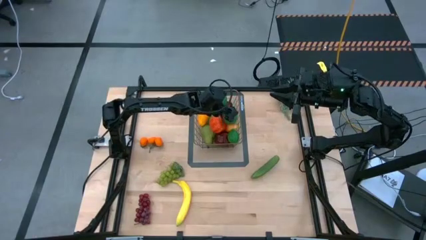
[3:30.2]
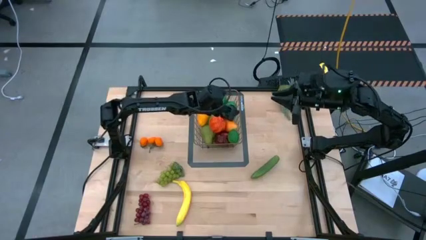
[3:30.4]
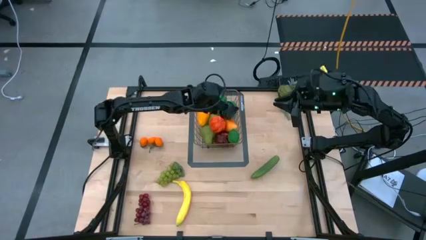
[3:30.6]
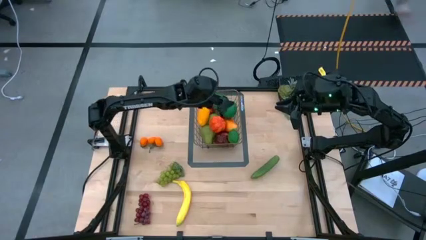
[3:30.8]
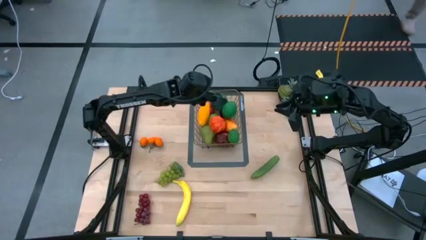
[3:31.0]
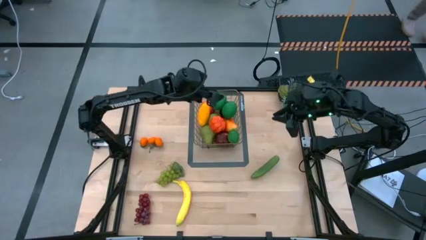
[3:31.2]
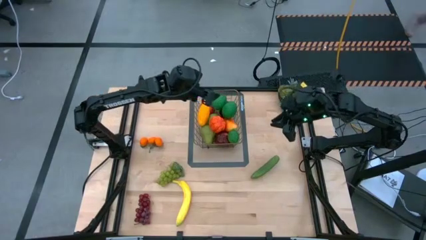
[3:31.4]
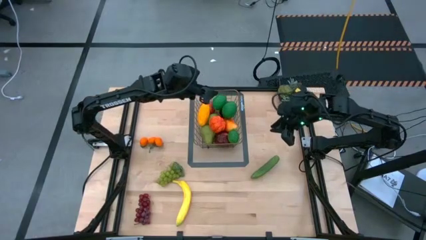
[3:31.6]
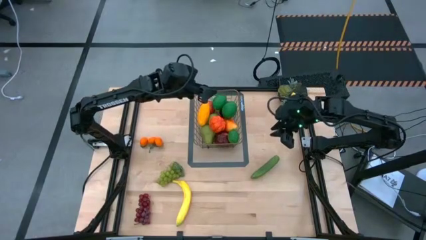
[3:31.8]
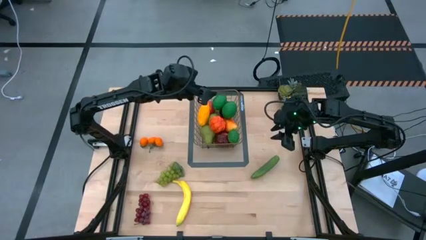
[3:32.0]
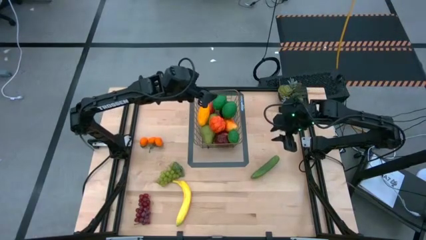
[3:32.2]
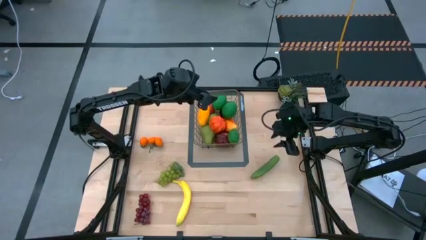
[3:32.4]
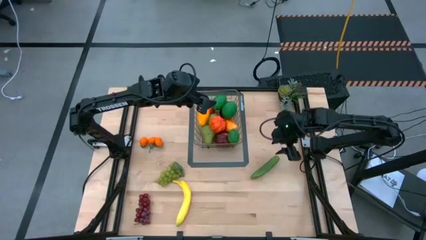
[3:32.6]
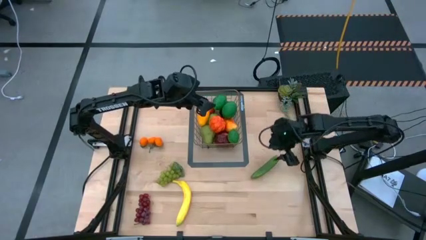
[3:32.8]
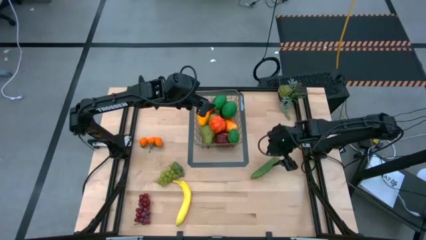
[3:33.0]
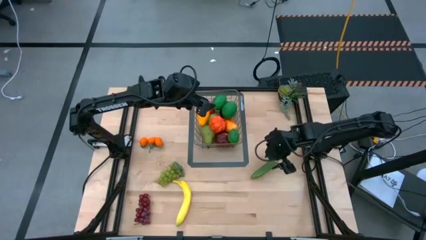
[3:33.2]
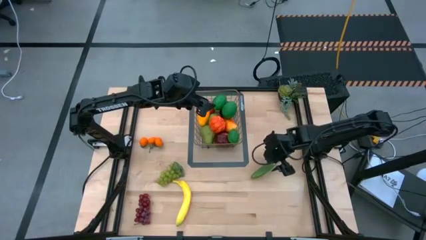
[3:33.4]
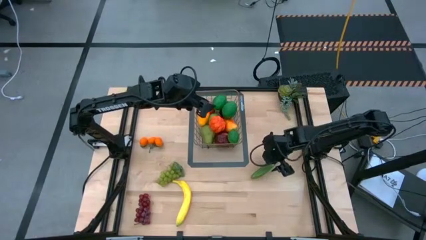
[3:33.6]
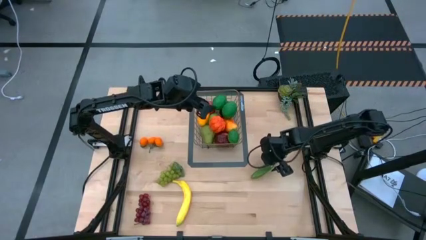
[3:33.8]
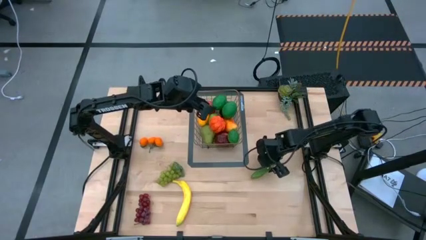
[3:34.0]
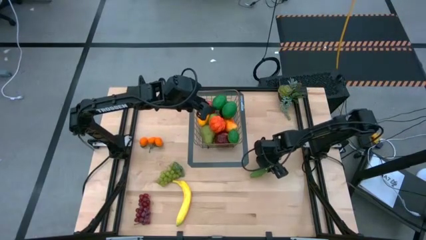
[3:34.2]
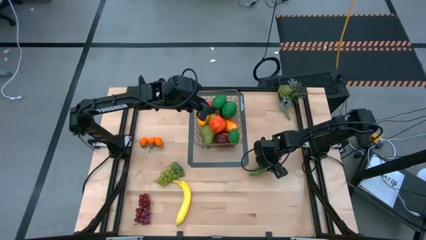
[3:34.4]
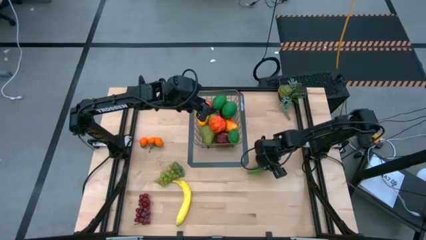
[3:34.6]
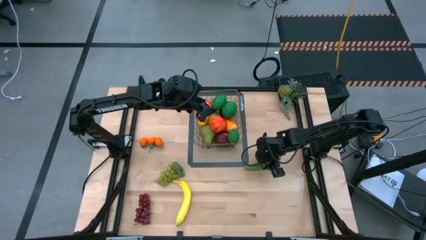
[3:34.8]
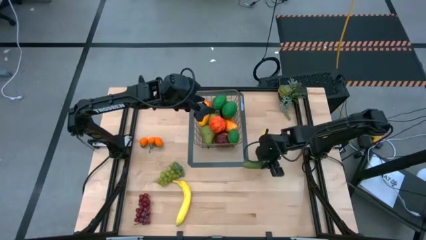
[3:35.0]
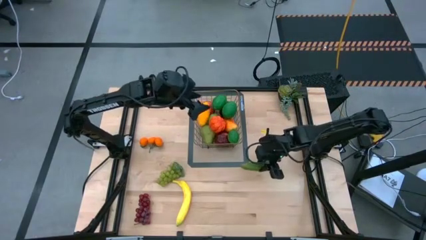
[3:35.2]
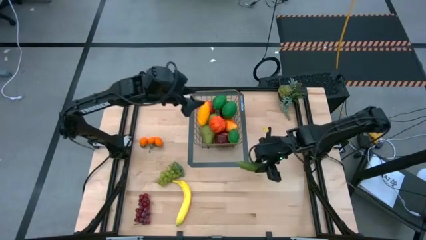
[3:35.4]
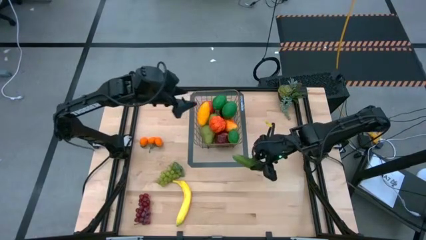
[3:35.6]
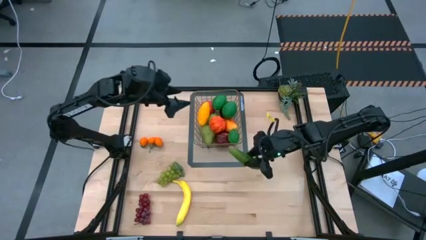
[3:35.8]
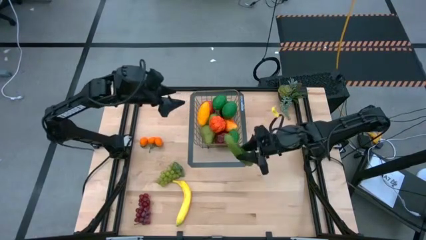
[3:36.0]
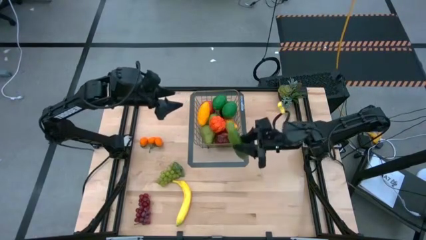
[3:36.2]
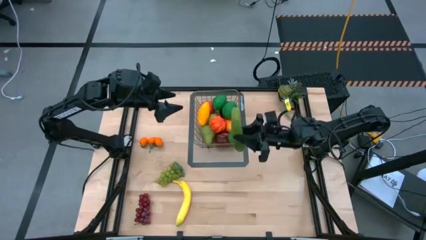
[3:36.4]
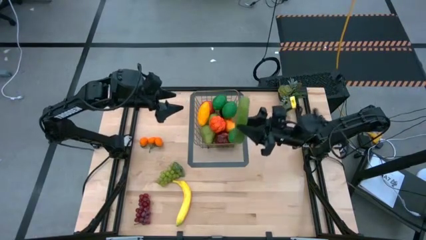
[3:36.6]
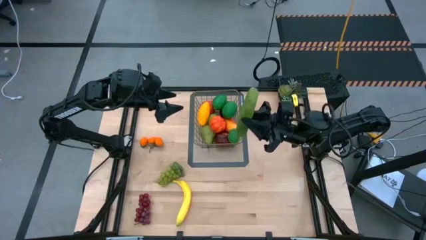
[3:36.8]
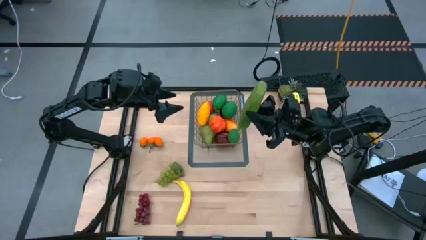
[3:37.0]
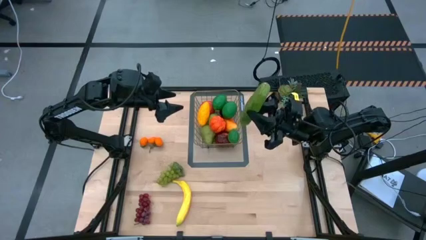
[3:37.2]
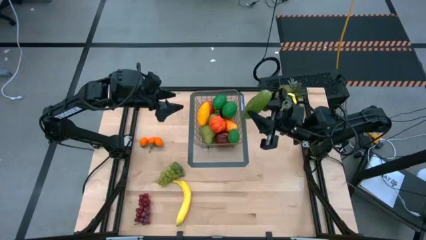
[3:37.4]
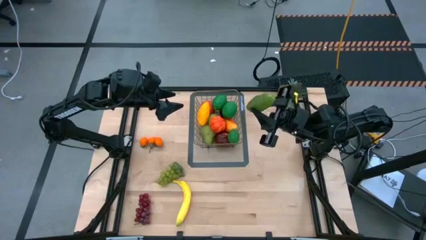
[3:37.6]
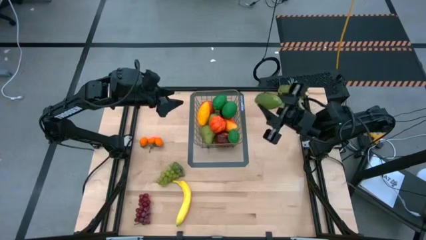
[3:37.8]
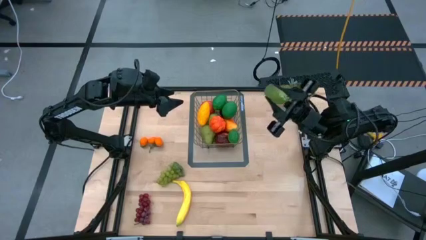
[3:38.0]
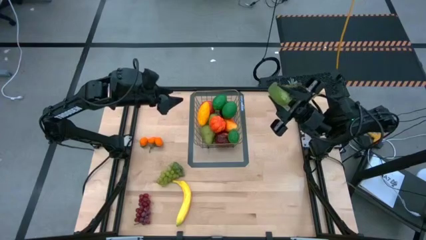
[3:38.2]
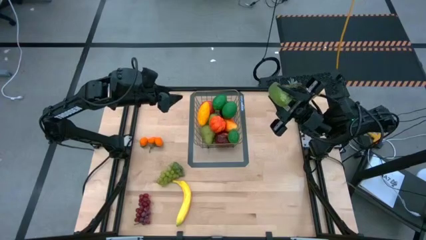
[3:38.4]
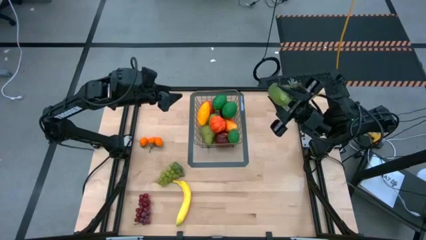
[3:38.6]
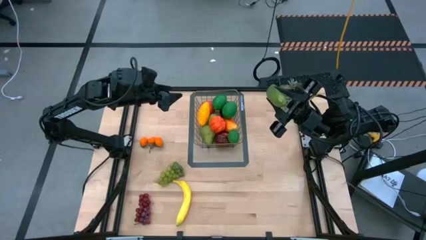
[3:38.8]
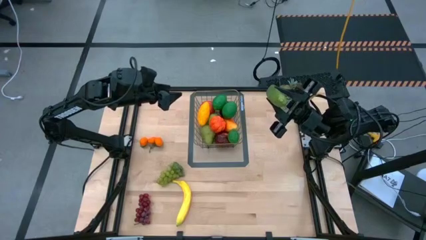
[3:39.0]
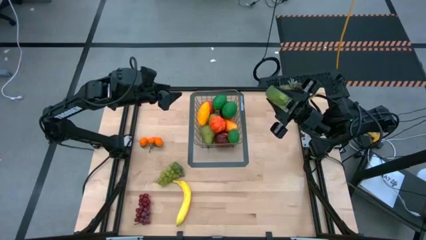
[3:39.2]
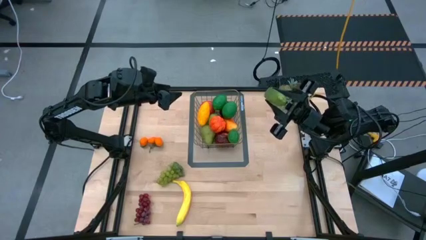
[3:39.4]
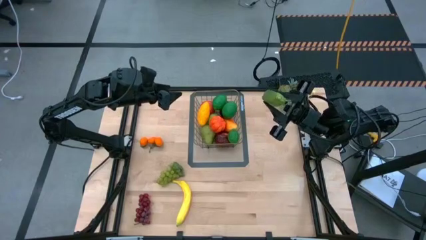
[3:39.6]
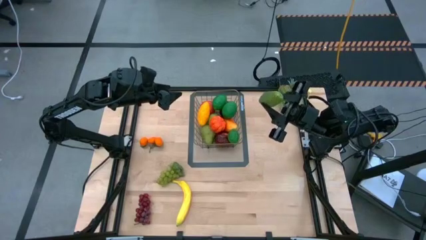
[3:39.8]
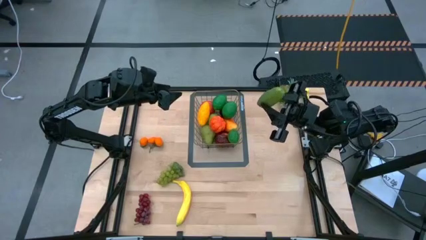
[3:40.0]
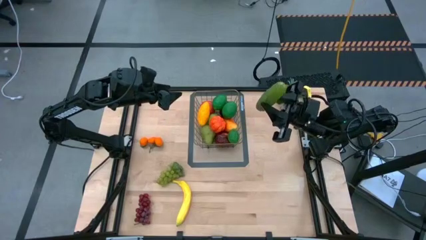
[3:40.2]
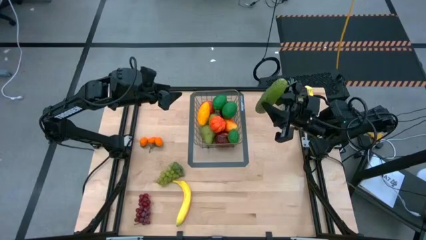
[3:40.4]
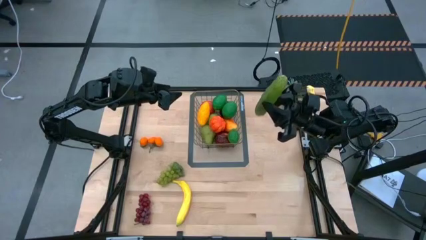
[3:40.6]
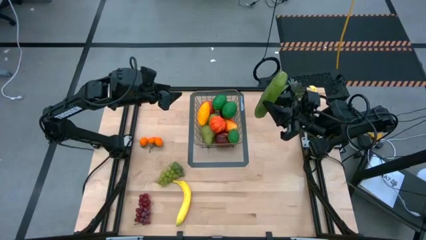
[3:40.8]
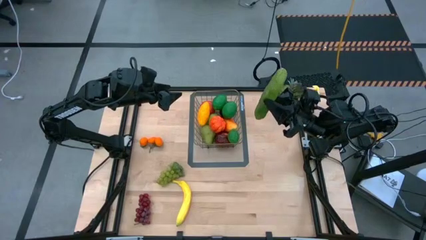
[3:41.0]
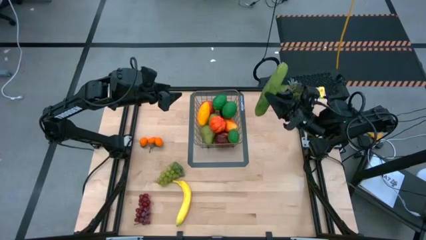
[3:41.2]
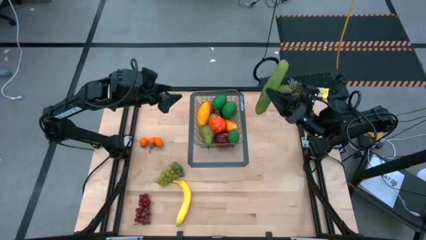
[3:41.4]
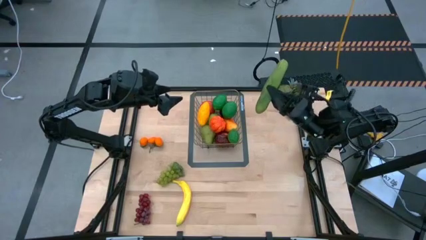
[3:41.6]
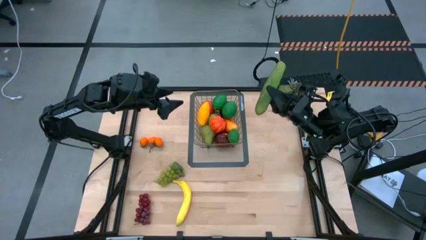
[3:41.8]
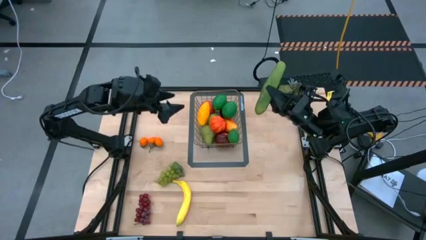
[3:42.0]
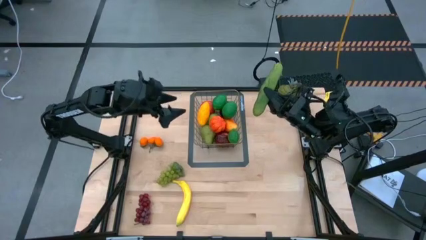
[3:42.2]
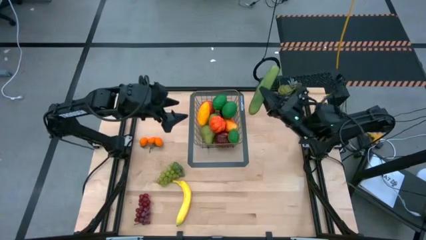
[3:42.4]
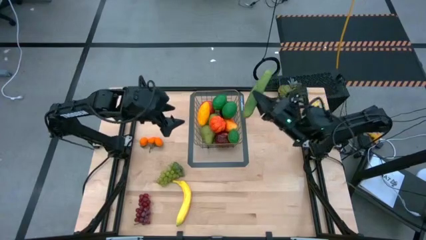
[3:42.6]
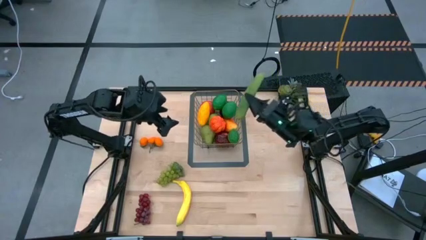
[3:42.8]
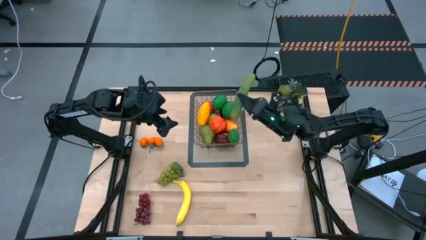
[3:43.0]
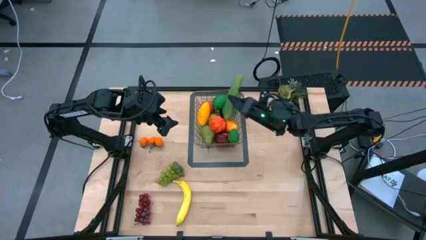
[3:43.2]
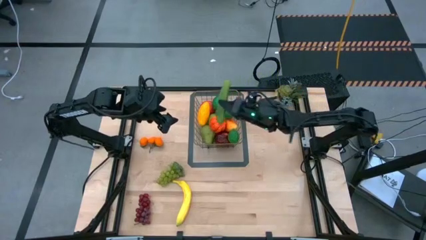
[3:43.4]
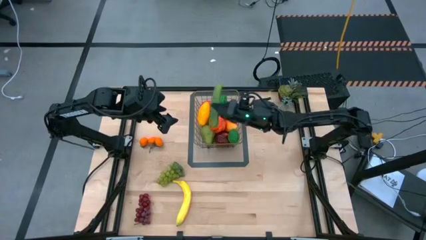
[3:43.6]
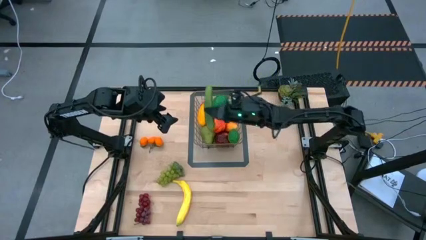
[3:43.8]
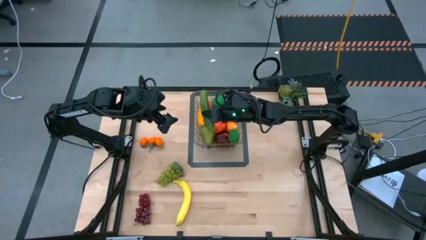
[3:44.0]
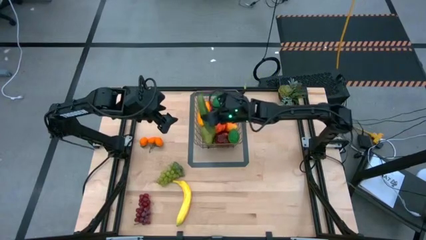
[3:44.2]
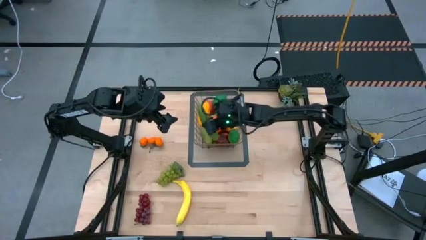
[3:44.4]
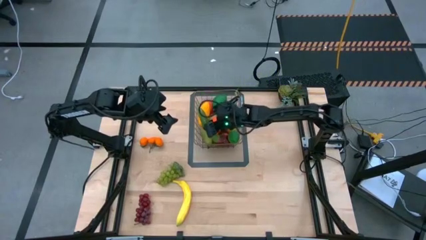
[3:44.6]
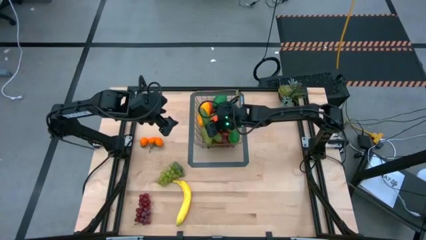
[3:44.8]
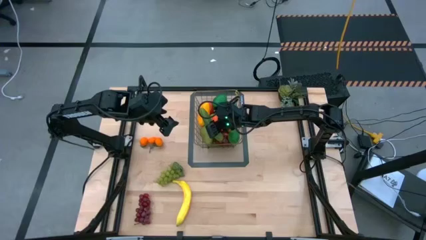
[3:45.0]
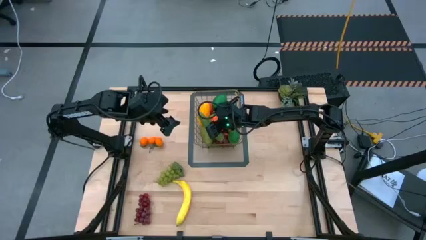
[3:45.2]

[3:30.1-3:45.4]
Task: Build produce basket
Put the green cucumber into the gold wire basket
